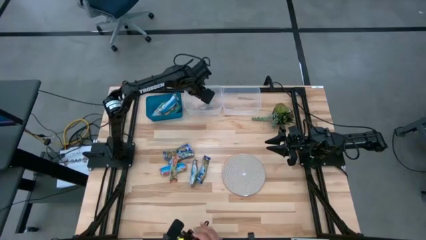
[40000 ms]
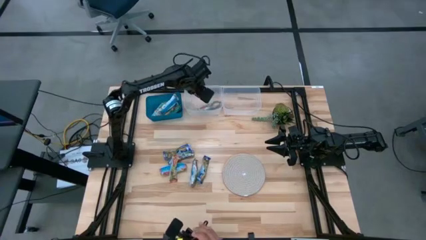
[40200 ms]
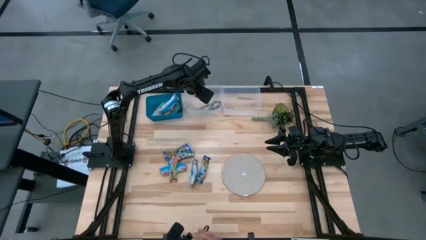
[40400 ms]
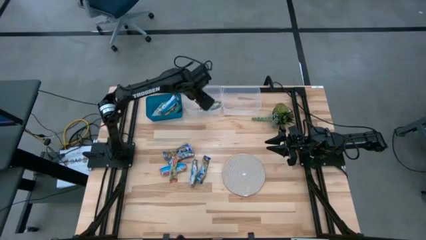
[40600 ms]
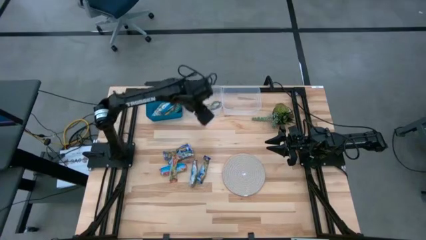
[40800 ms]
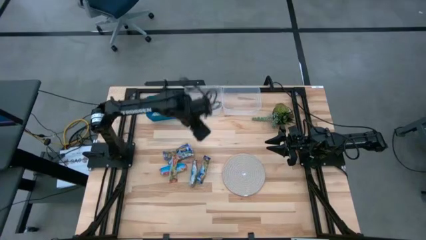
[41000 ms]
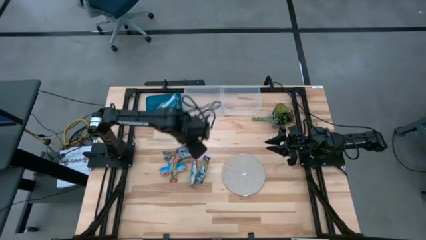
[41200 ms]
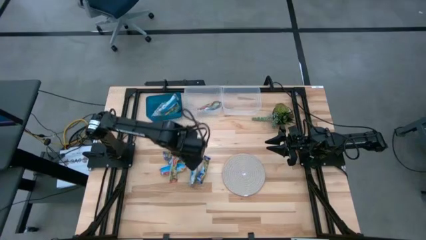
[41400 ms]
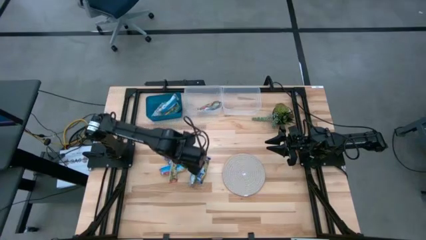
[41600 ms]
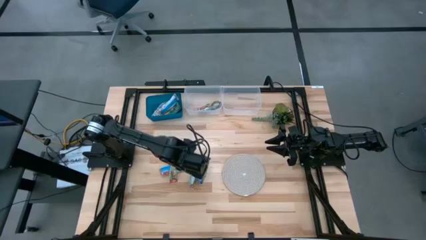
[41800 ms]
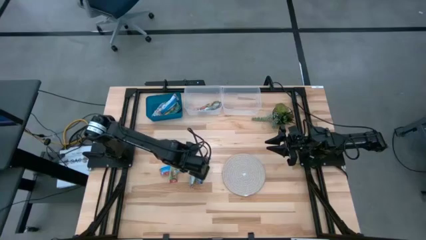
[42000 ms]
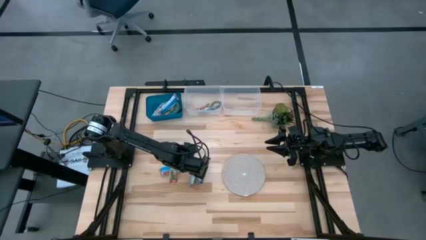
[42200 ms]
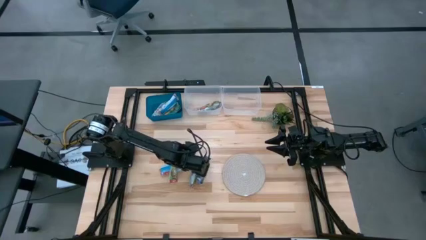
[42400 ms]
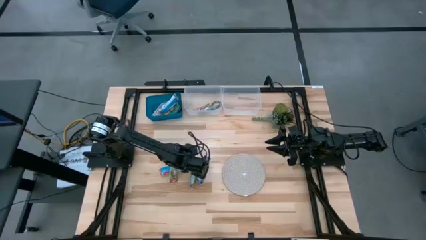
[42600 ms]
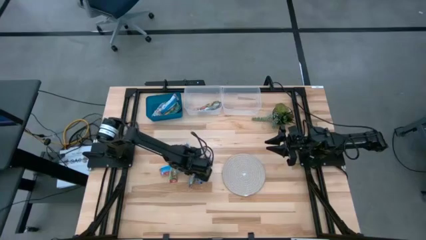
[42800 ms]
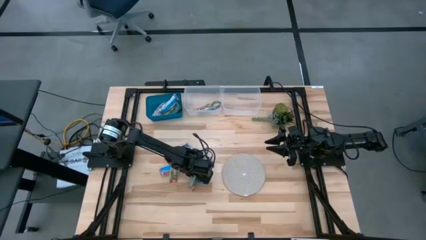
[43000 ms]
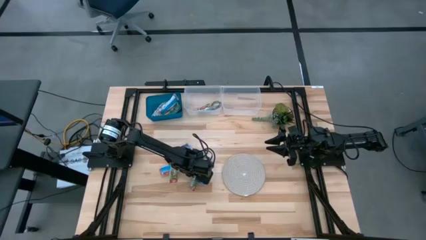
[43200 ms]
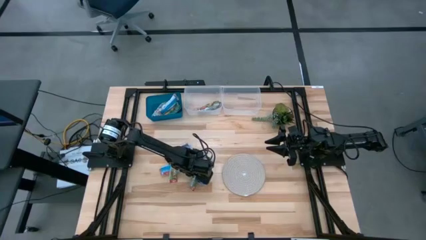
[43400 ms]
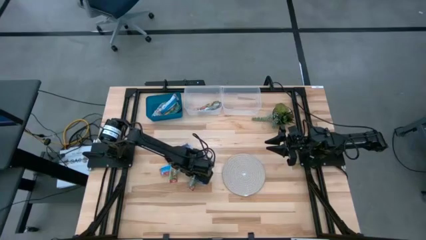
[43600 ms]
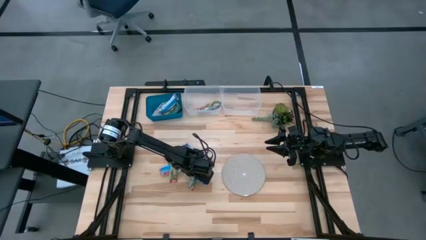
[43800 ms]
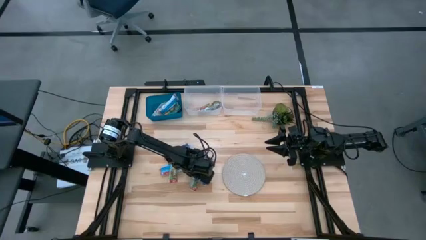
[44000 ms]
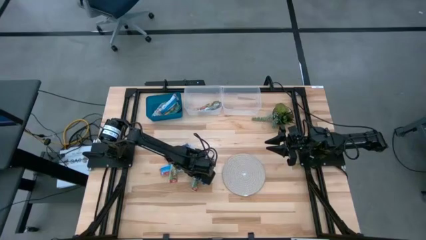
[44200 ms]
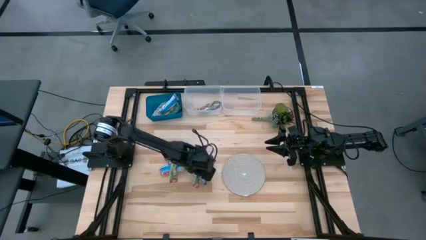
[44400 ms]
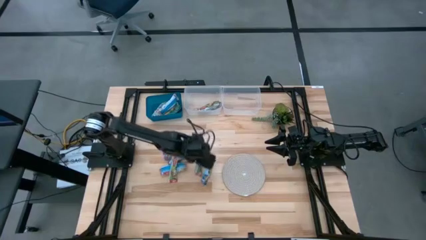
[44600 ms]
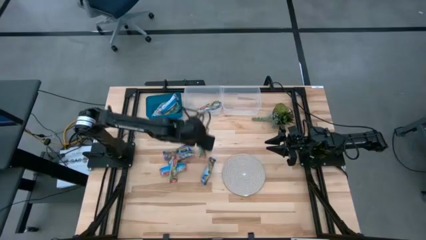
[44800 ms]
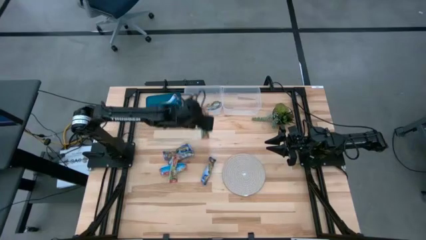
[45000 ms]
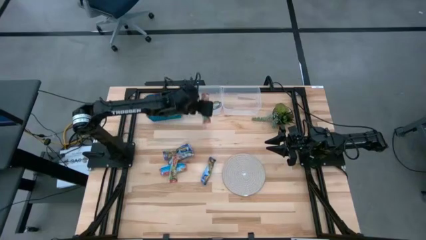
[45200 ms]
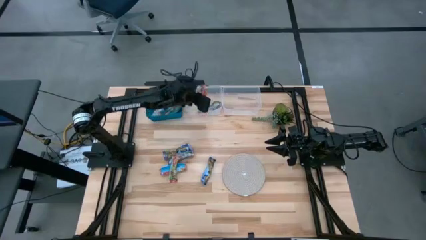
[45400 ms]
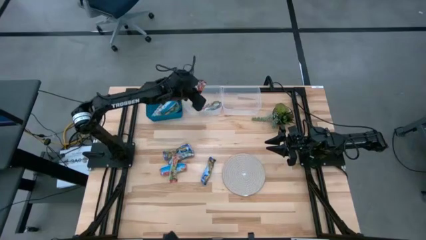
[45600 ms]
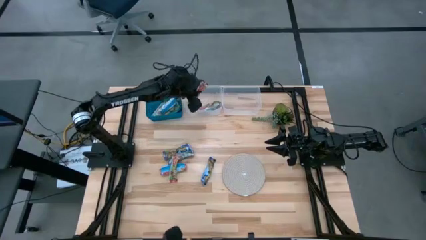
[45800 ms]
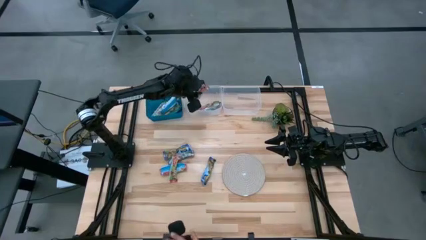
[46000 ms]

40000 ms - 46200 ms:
Task: Pick and place Granola Bars by type
Put the red granola bar into the left transparent bin

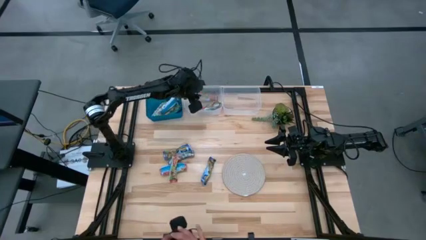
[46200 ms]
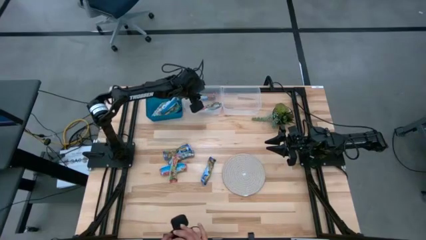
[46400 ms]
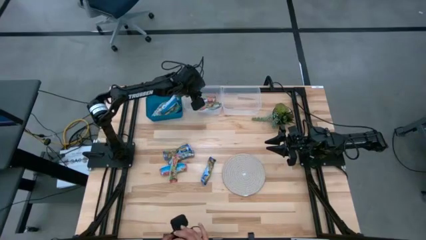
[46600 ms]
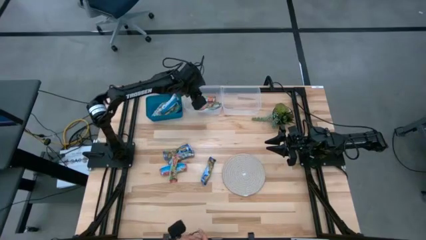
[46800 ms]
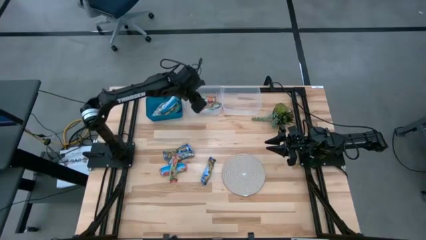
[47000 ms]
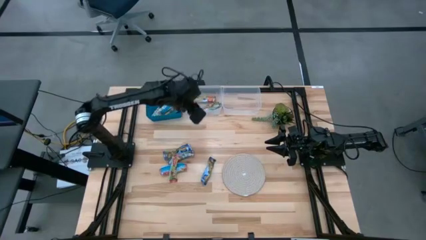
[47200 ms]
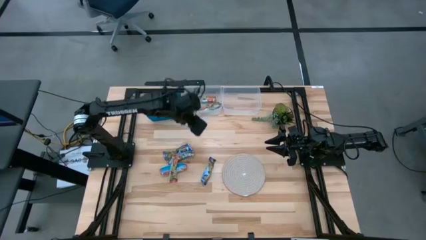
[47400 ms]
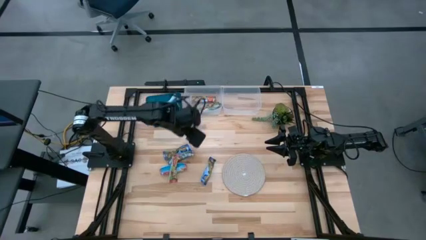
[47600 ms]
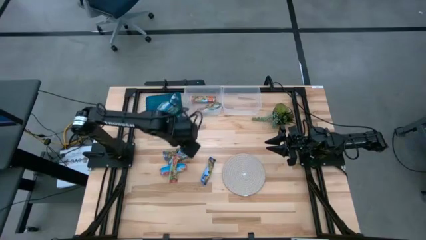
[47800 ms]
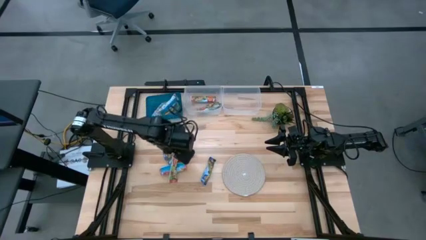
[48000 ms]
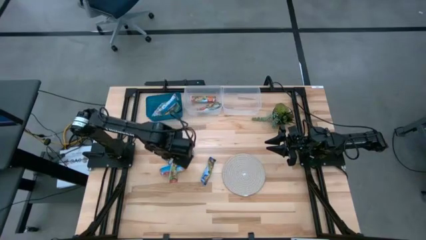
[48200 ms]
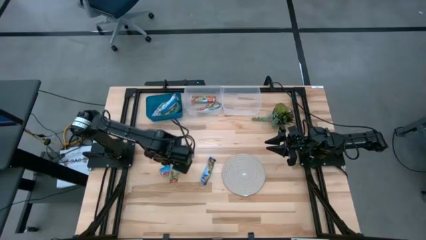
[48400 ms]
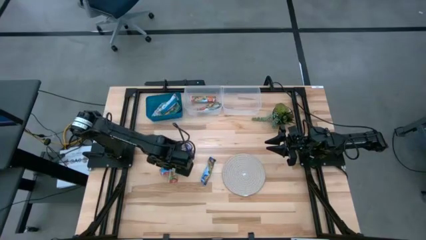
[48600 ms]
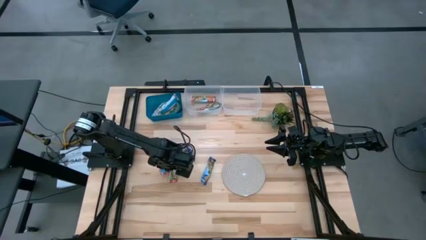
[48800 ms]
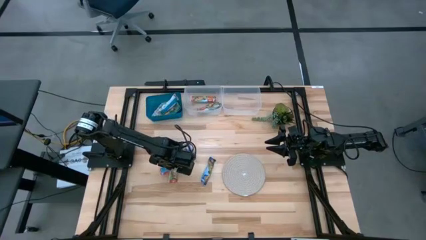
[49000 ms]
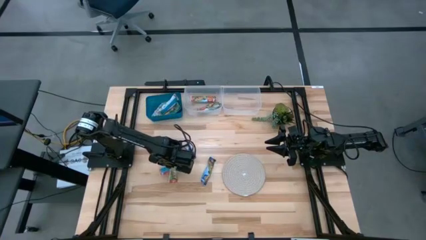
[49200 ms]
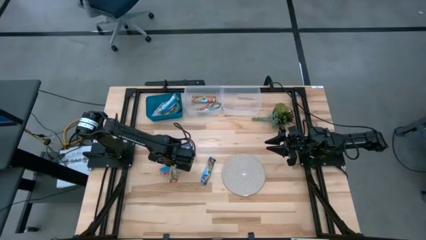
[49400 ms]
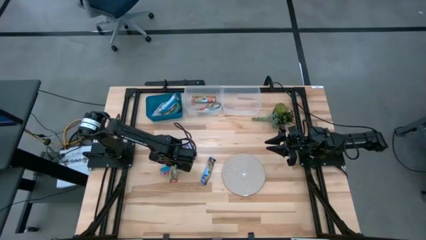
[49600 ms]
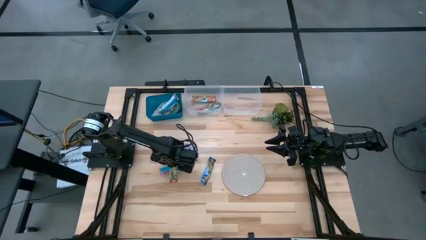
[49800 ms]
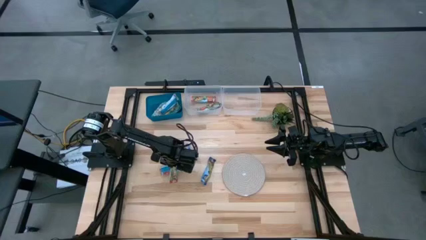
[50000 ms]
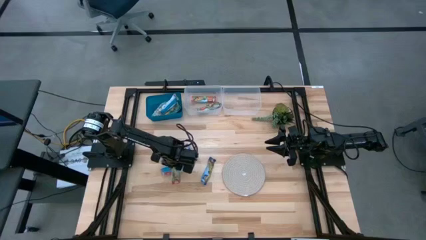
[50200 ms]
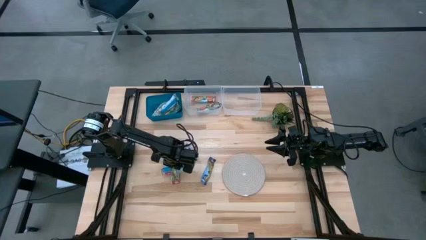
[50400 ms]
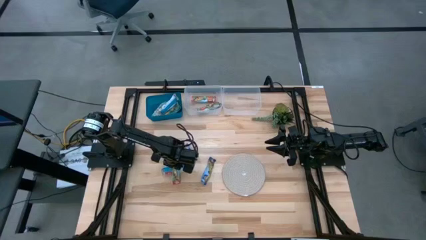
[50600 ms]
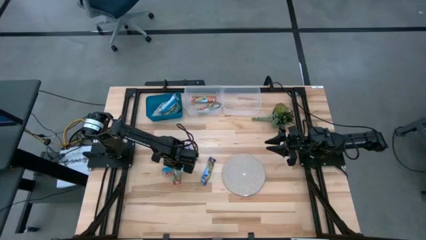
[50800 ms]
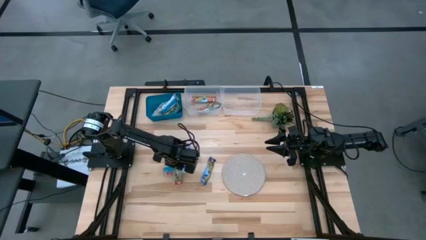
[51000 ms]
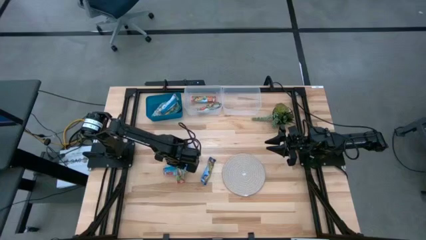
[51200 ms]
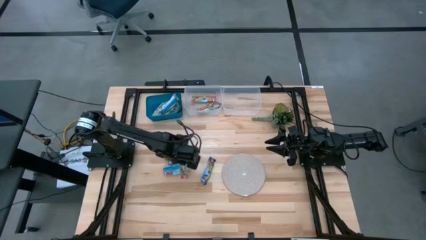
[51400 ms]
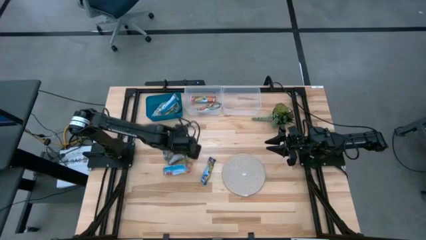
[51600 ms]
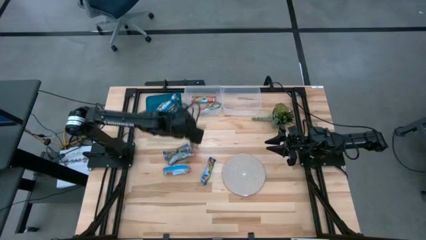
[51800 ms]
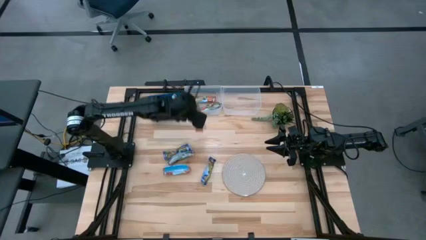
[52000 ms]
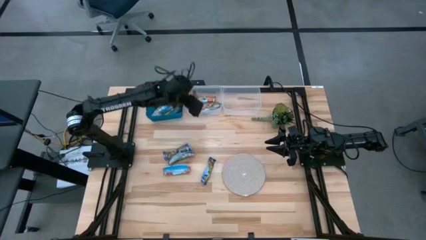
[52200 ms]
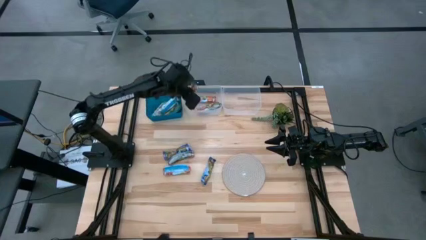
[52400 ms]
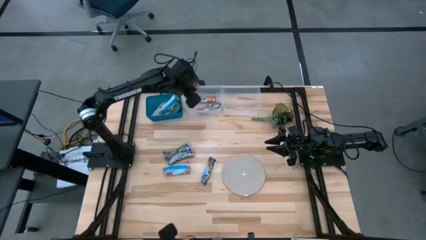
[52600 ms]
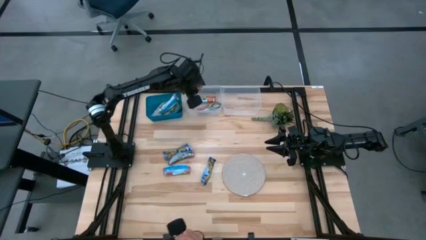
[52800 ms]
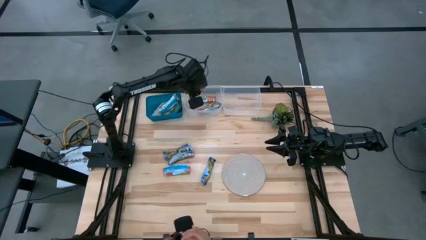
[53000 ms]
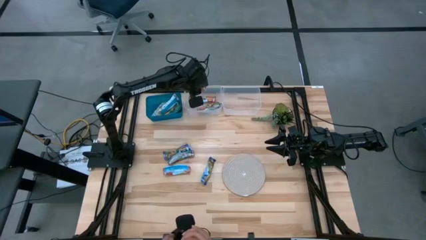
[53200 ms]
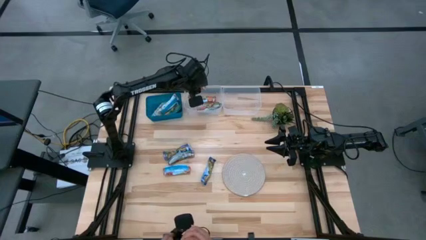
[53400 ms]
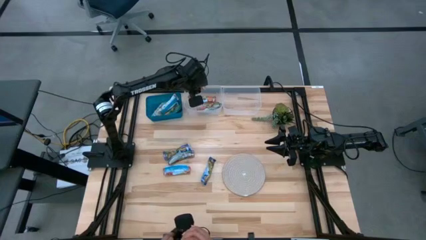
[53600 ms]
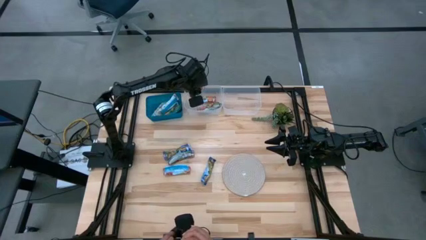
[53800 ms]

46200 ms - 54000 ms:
Put the red granola bar into the left transparent bin

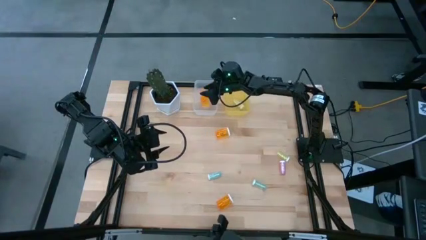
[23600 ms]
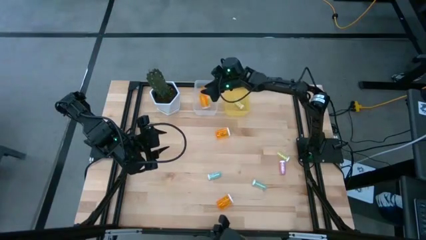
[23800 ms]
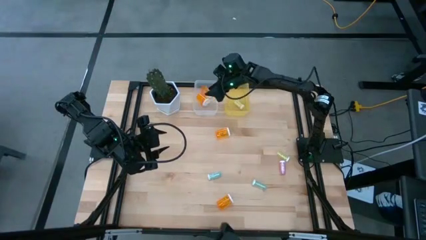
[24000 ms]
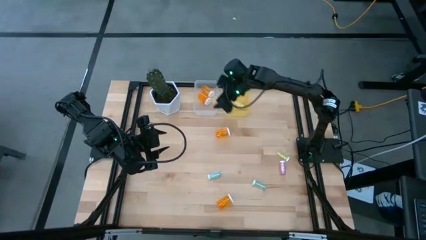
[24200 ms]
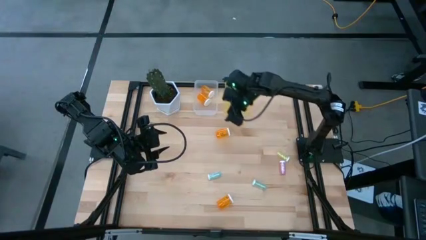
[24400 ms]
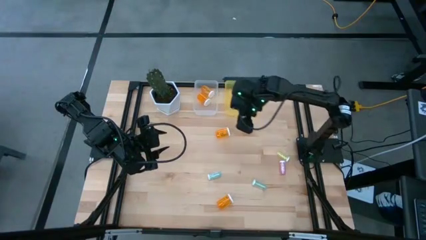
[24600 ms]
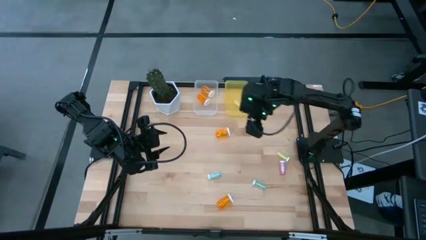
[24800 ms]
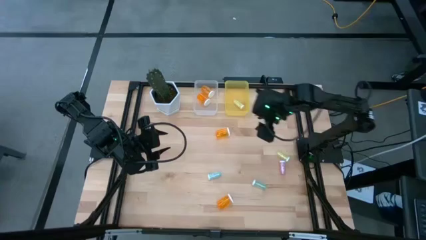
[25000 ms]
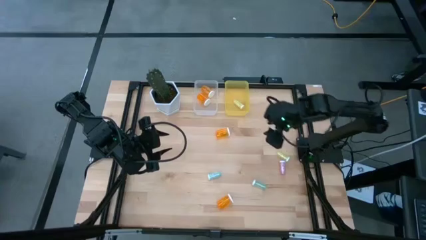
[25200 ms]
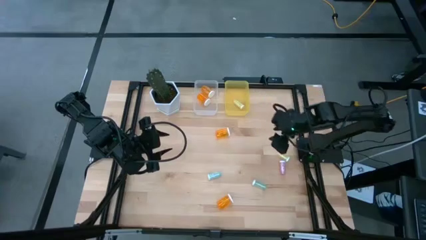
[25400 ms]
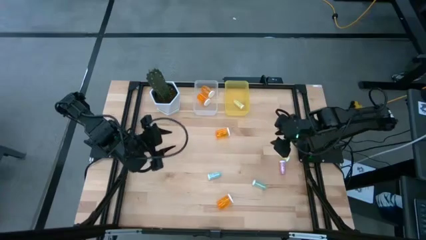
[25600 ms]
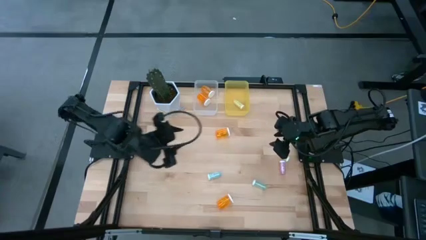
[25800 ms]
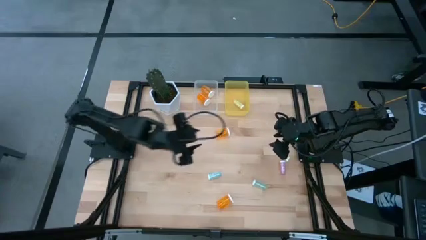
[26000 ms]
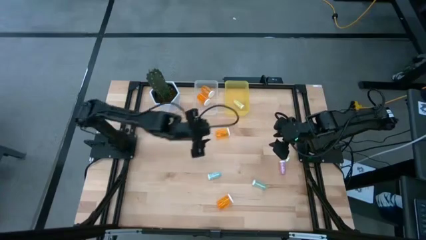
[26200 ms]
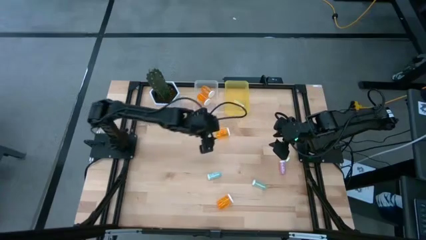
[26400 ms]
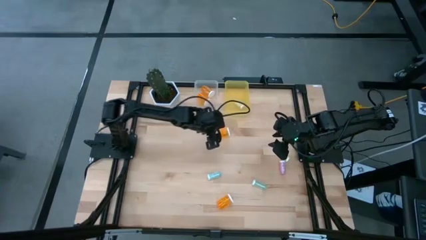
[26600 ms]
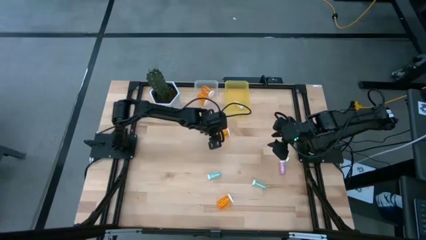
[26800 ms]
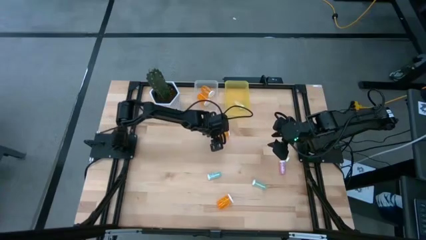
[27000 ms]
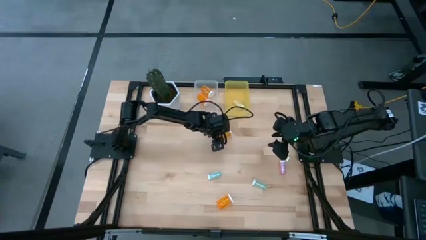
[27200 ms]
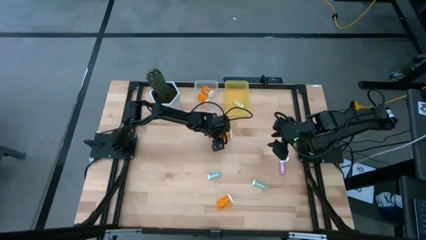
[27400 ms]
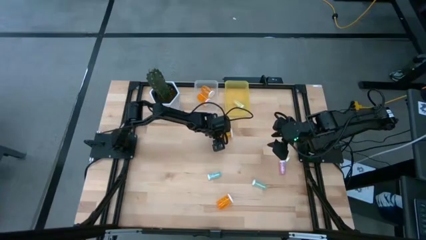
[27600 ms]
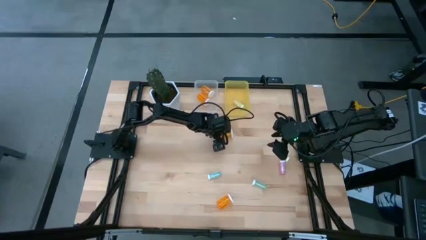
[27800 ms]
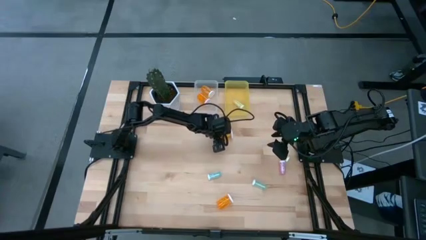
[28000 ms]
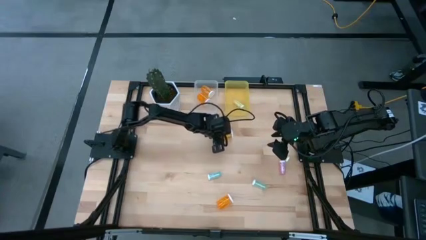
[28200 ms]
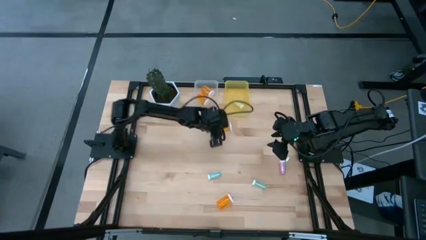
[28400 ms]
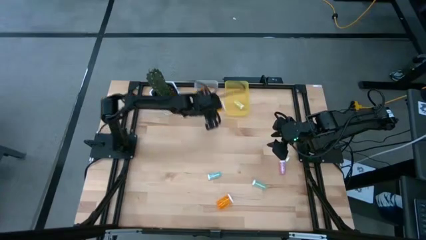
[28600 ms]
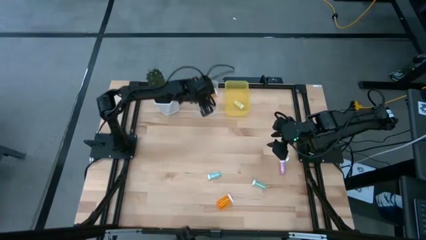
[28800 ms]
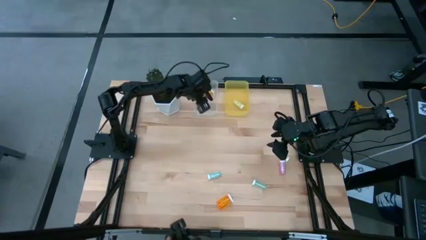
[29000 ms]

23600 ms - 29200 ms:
Task: Pick and place medicine bottles into bin by pill shape (circle, oval)
Put the top orange pill bottle into the white bin
